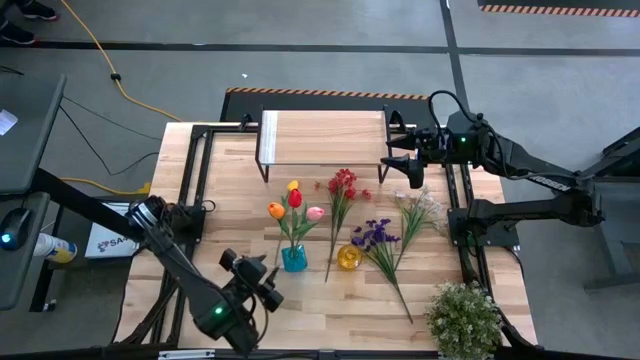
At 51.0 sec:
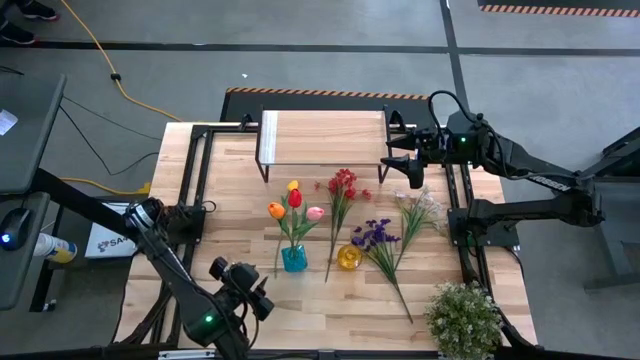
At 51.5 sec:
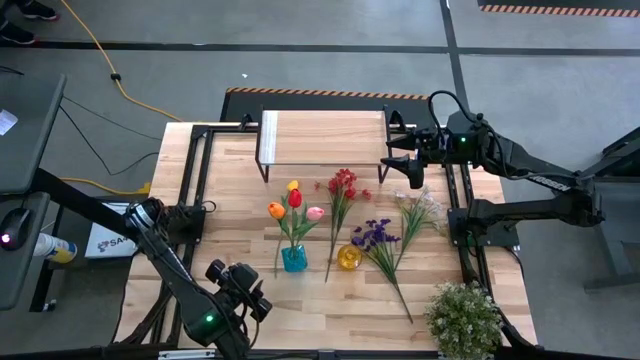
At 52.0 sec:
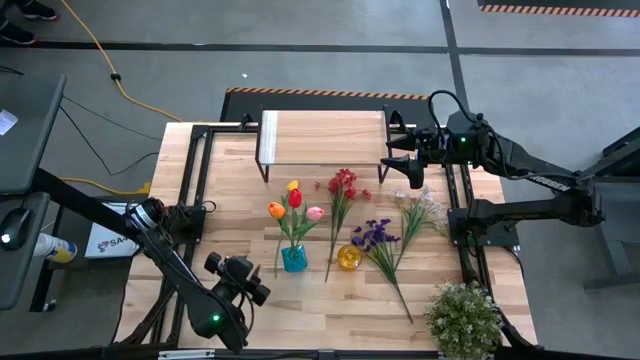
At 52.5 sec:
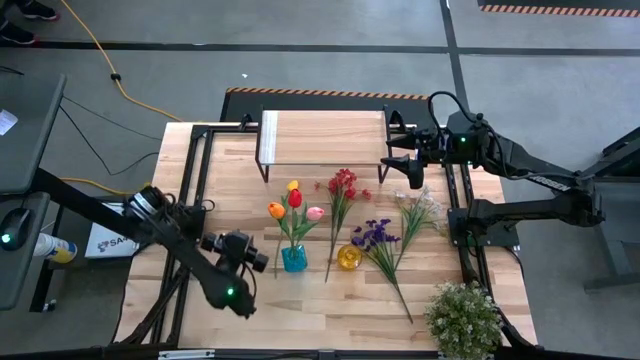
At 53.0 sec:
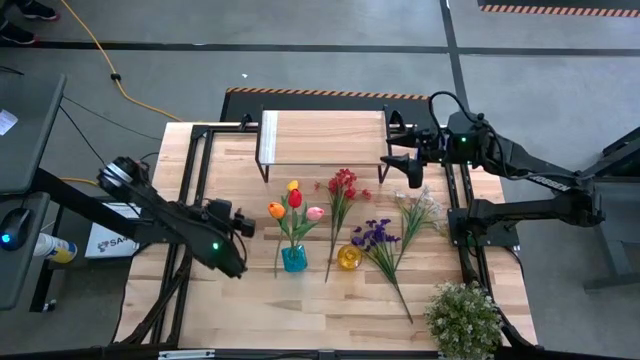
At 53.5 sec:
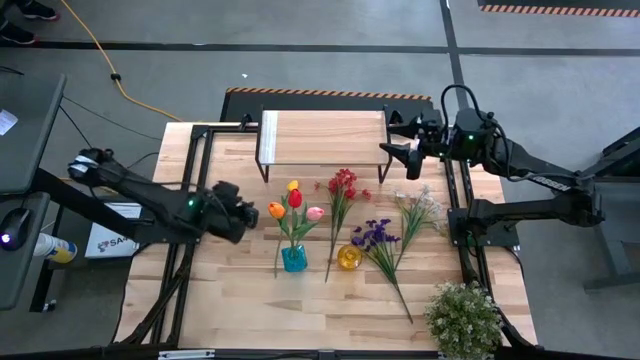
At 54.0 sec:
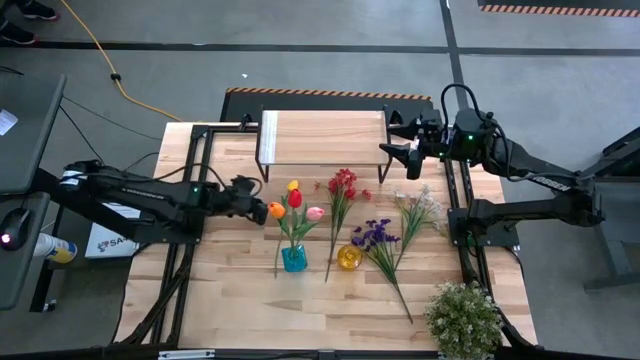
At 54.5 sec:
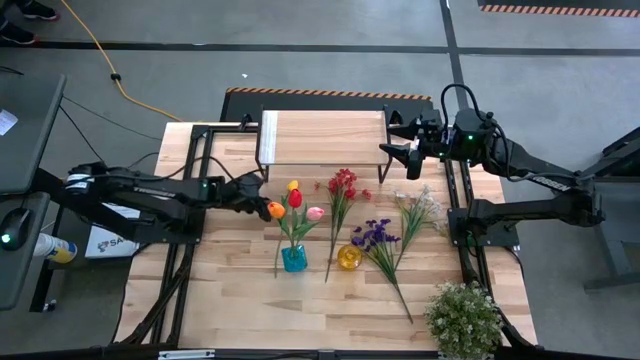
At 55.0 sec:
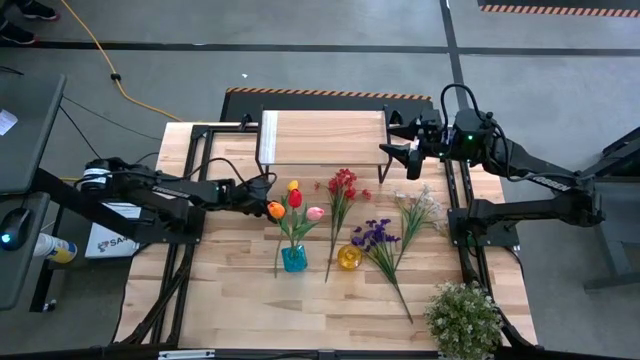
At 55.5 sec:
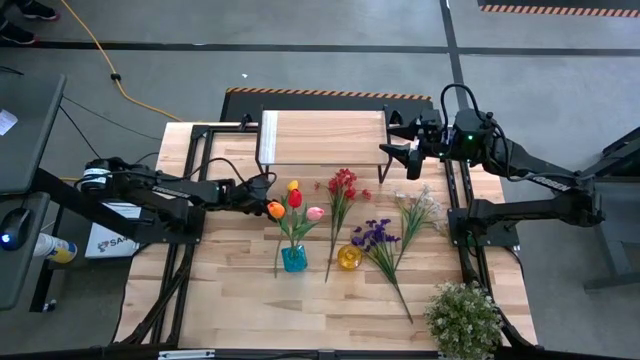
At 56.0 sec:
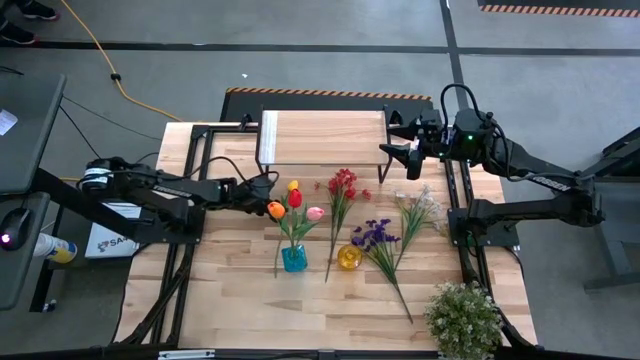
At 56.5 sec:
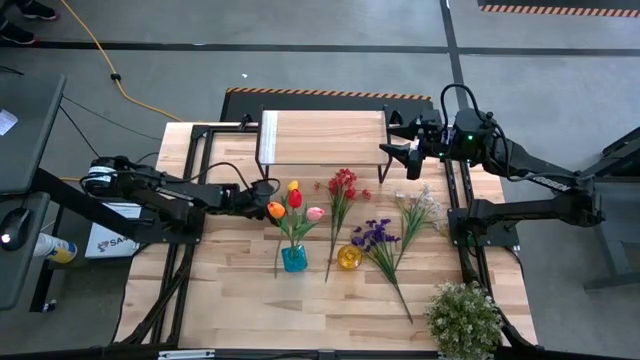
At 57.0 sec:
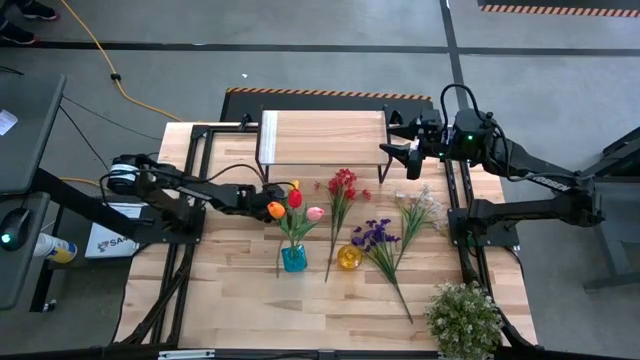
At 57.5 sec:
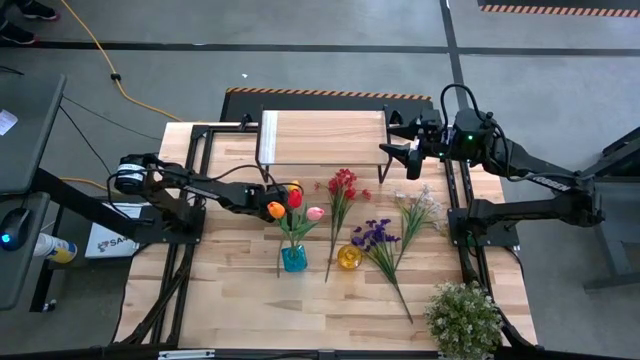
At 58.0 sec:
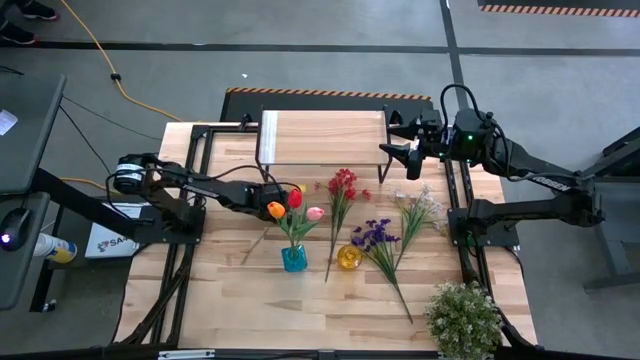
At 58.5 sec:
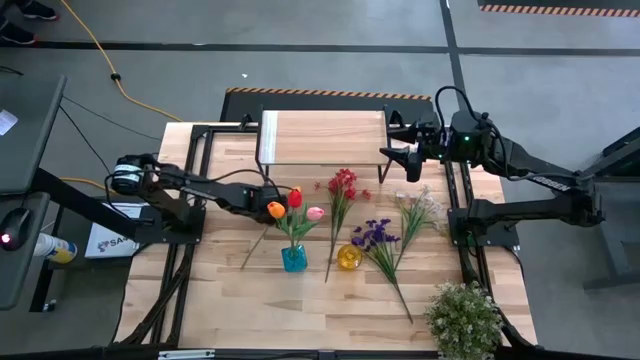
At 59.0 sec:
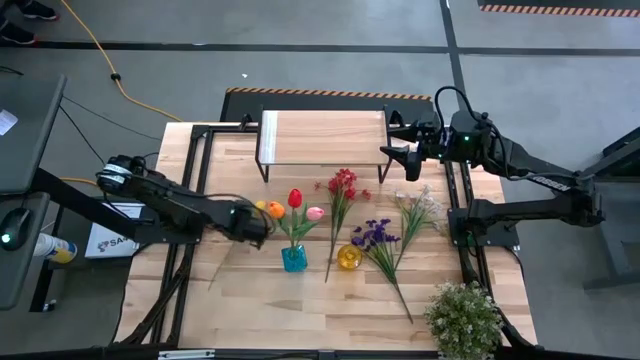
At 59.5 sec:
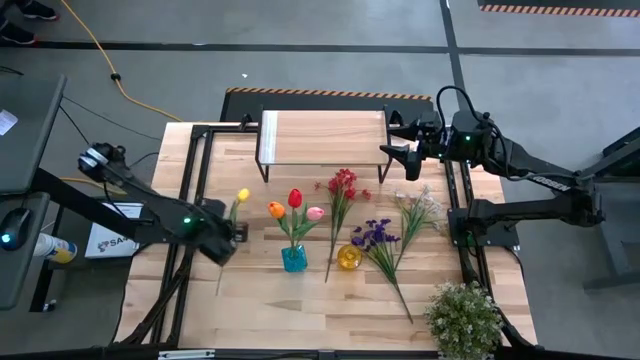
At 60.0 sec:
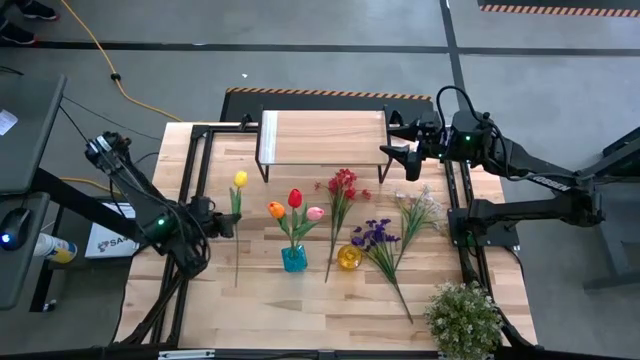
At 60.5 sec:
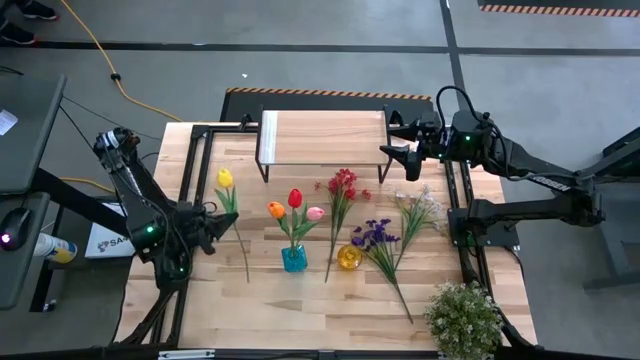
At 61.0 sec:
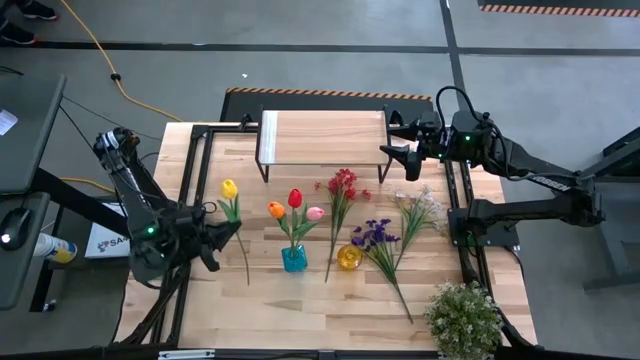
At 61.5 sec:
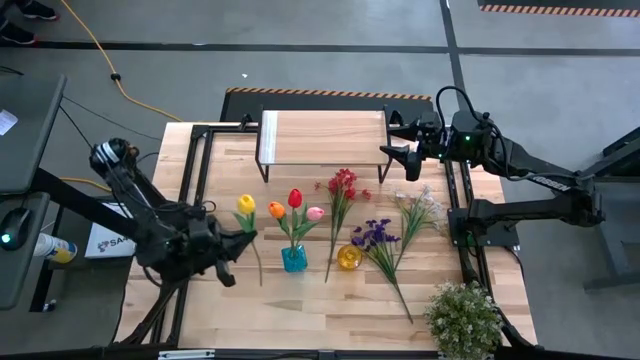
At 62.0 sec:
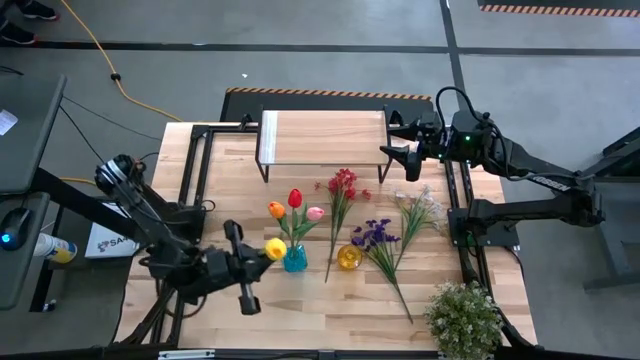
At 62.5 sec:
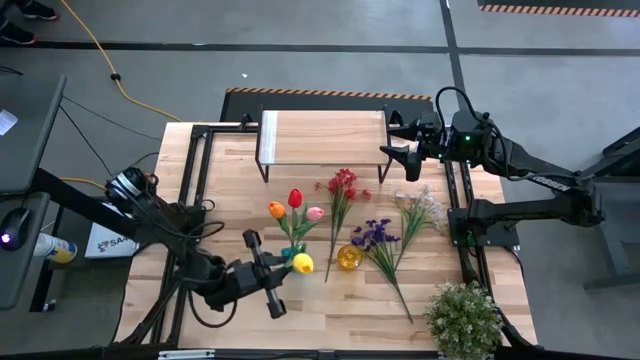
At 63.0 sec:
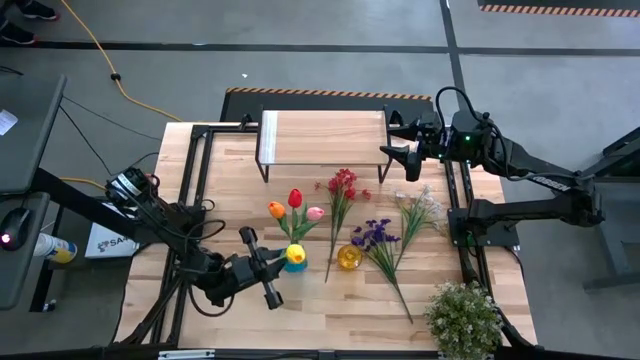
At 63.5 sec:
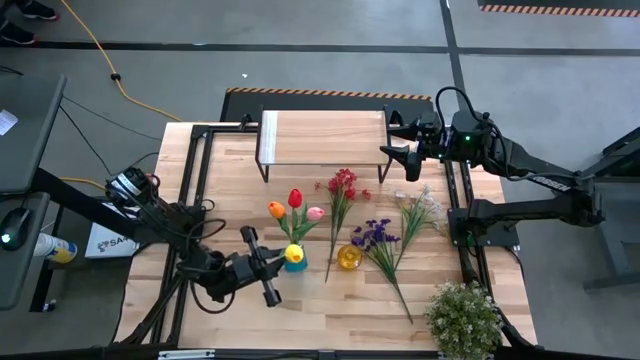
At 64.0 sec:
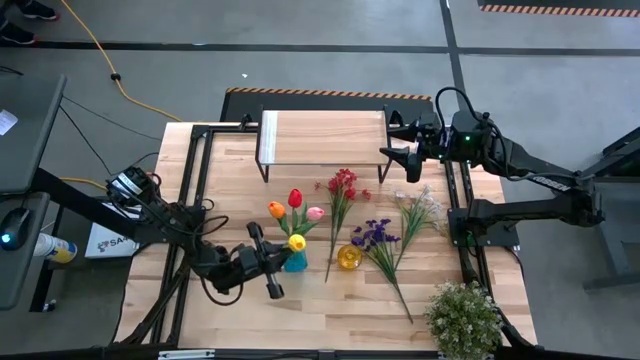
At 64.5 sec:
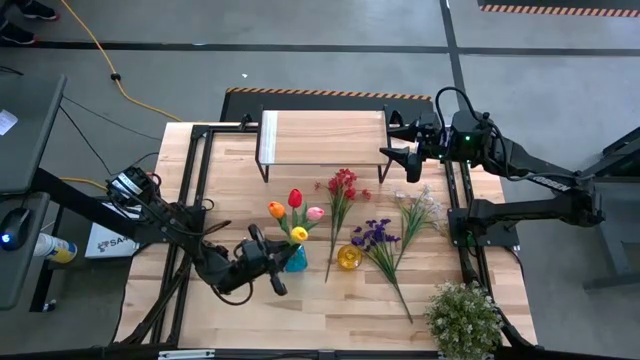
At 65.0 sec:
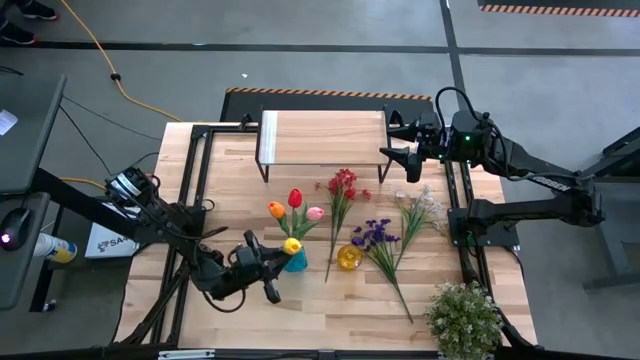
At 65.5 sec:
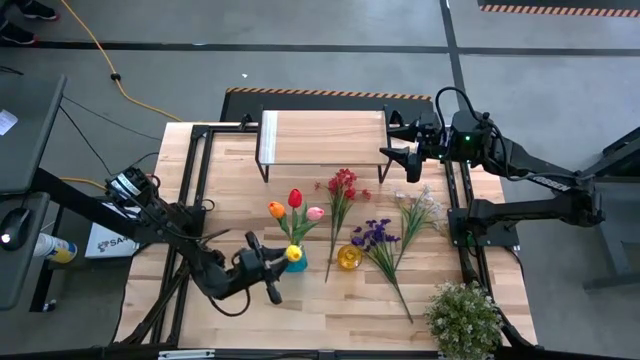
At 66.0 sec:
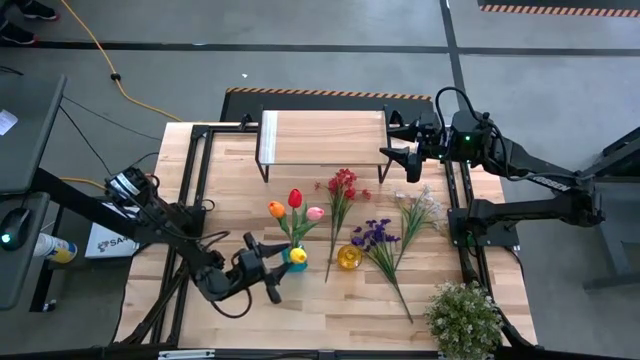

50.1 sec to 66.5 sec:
Task: Pick and place flowers into a vace then onto a shelf
Put the yellow tulip into the blue vase

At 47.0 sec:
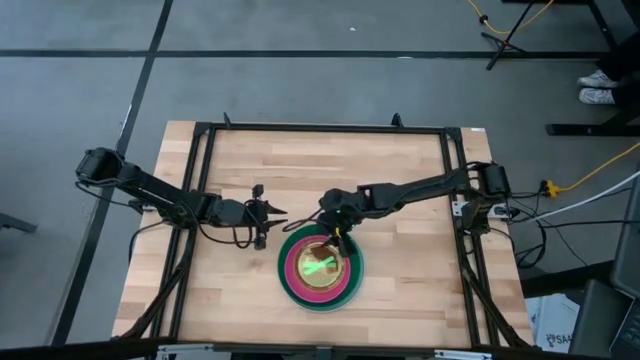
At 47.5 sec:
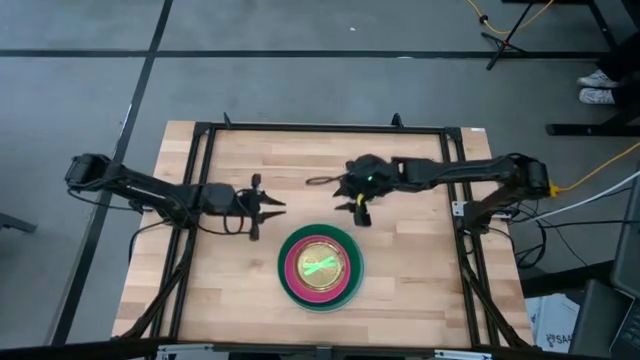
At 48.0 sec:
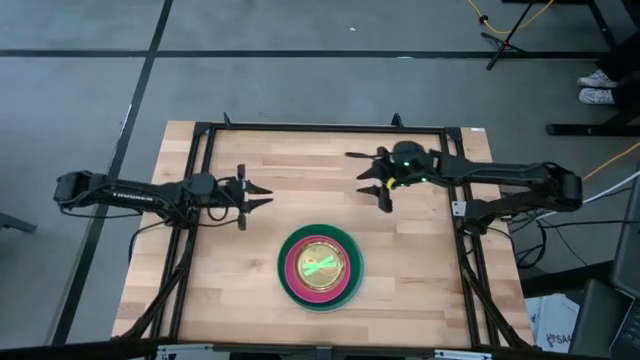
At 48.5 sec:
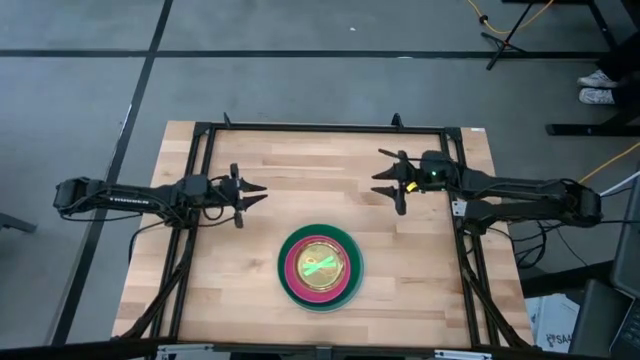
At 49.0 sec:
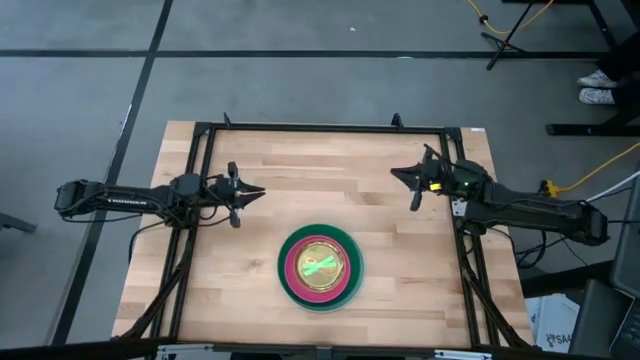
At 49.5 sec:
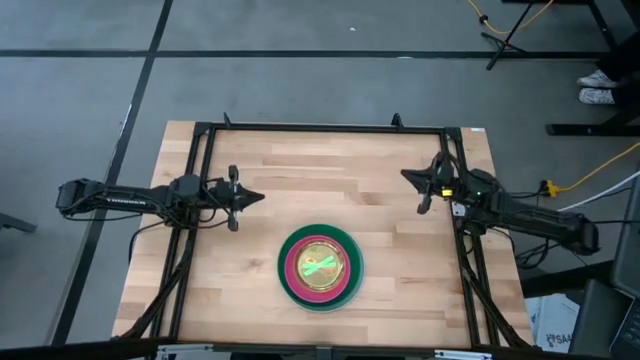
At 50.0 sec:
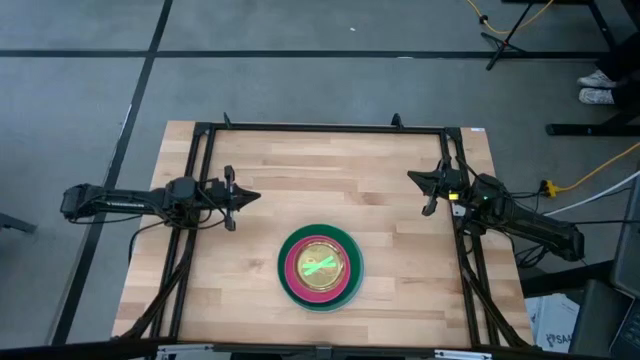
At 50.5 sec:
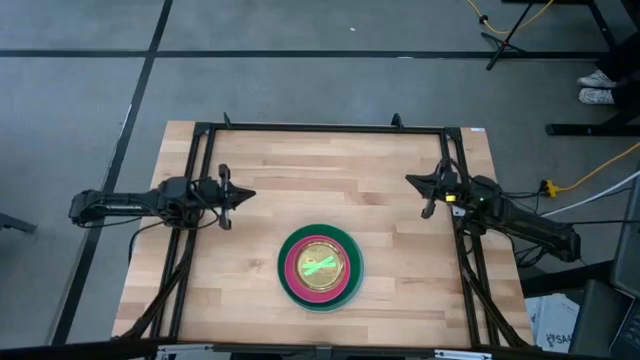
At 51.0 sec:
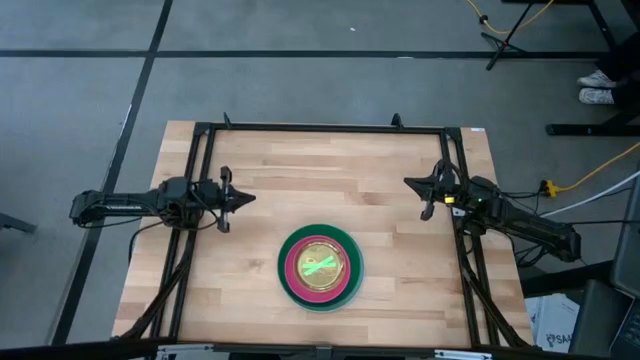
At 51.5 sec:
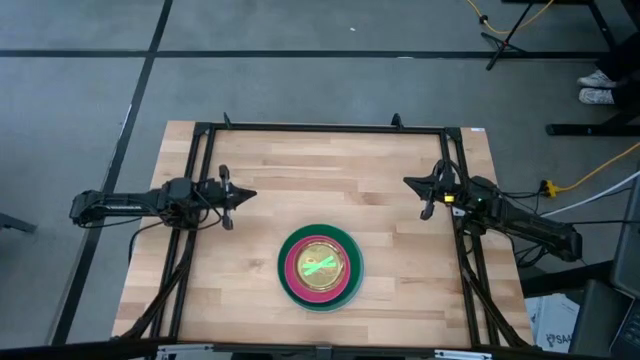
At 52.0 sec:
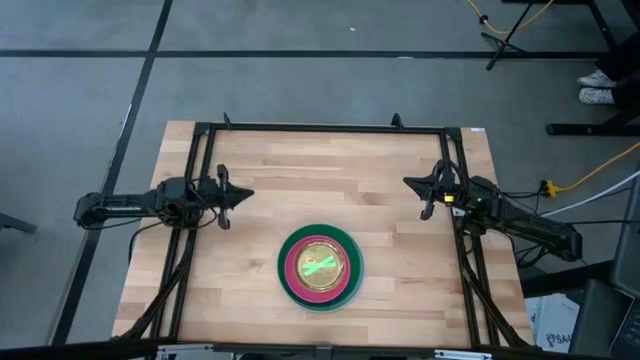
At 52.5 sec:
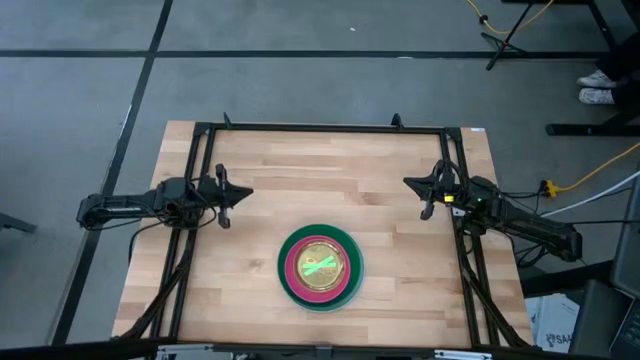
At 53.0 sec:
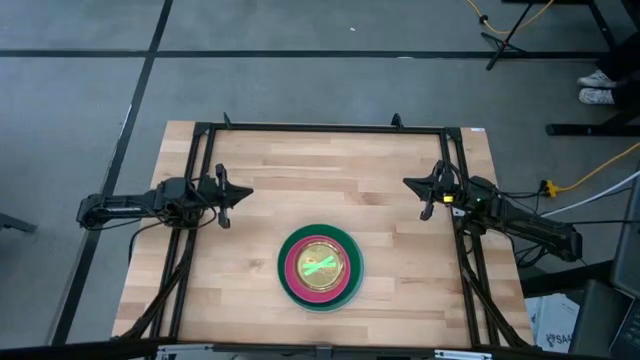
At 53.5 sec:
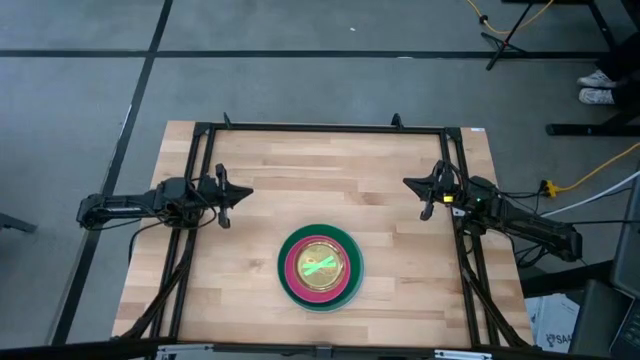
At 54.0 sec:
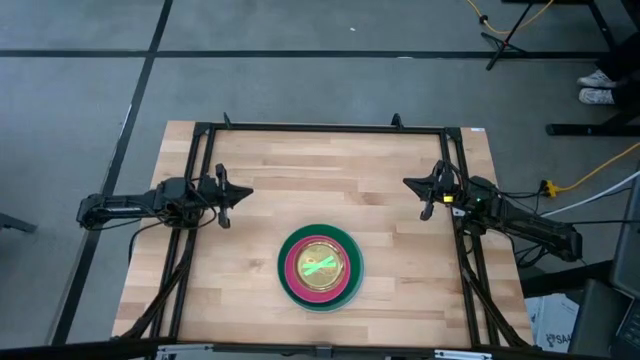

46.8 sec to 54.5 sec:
Task: Stack plastic plates
Return to Home Position
